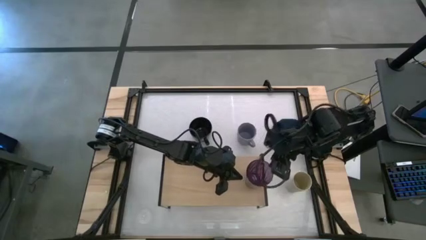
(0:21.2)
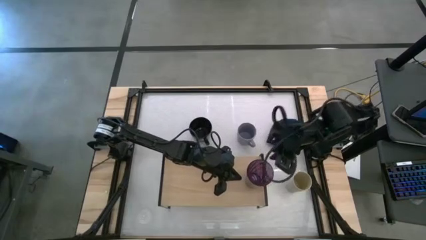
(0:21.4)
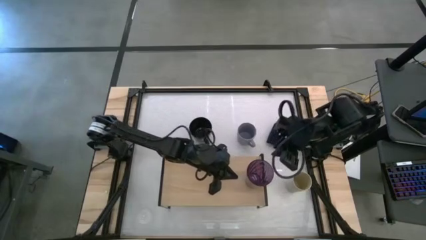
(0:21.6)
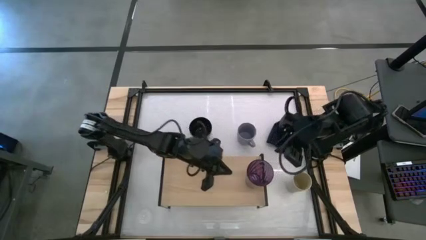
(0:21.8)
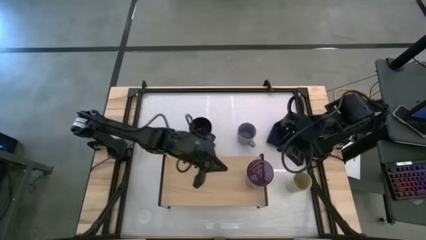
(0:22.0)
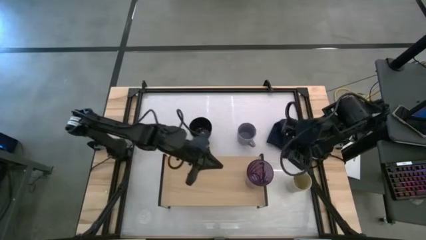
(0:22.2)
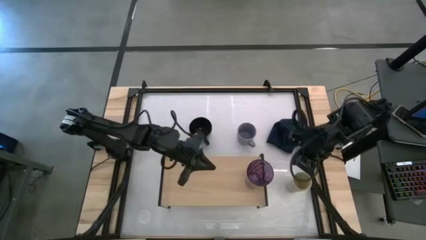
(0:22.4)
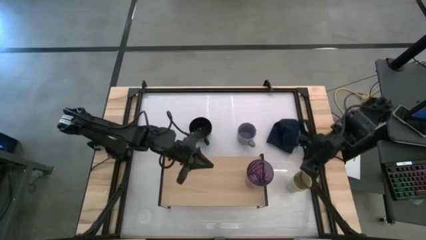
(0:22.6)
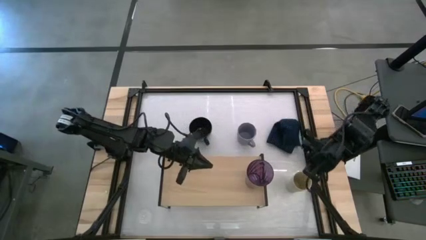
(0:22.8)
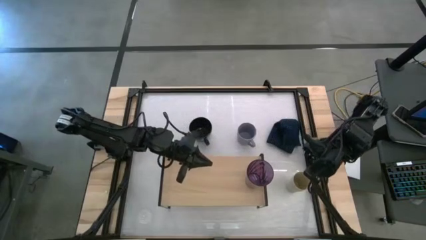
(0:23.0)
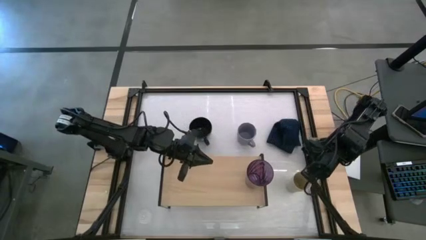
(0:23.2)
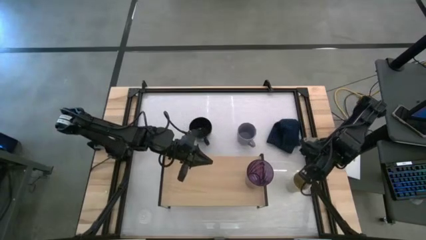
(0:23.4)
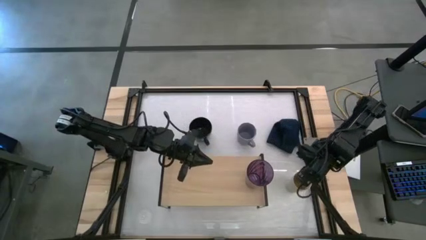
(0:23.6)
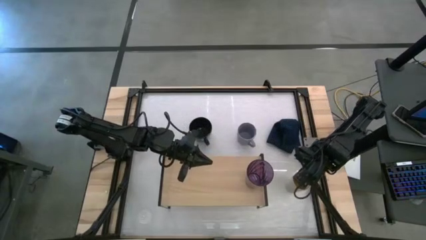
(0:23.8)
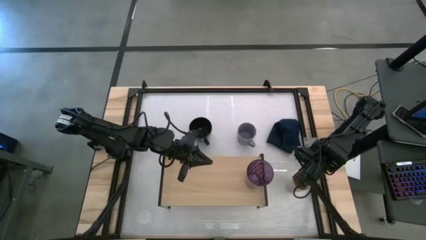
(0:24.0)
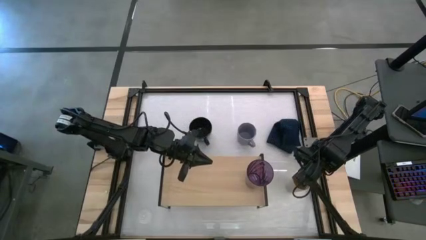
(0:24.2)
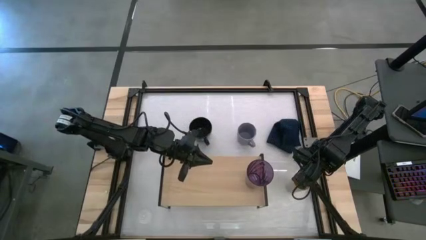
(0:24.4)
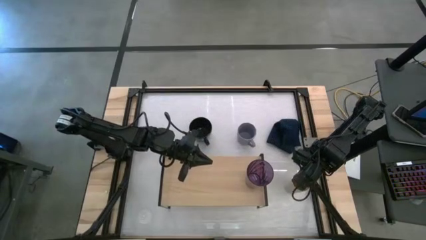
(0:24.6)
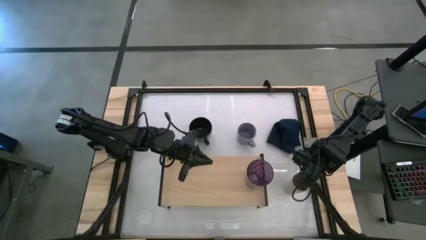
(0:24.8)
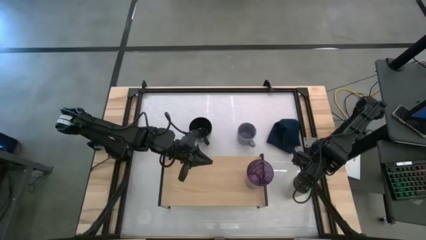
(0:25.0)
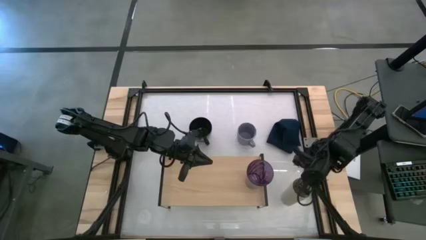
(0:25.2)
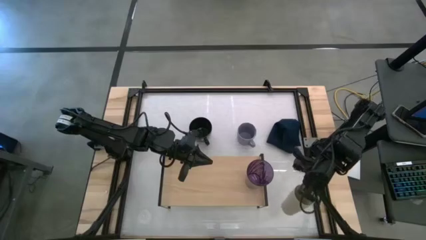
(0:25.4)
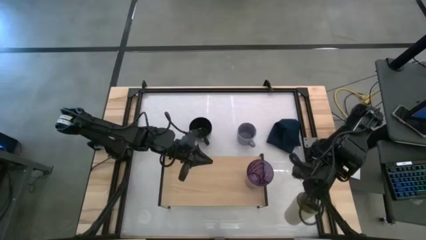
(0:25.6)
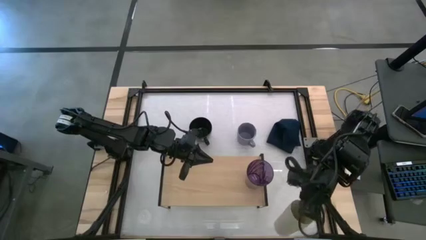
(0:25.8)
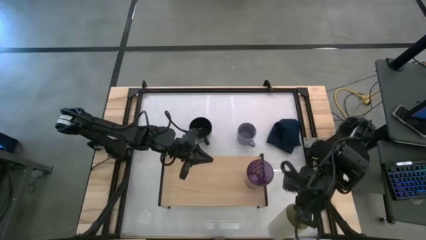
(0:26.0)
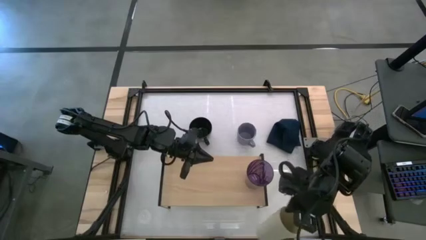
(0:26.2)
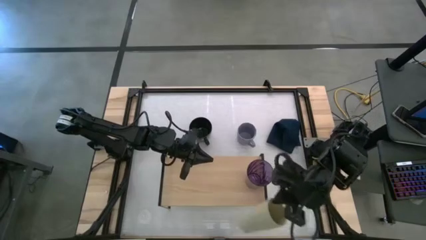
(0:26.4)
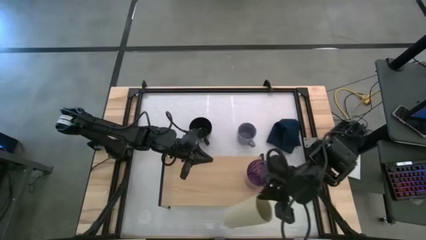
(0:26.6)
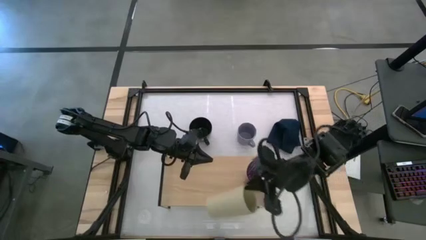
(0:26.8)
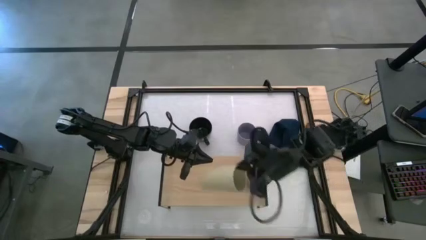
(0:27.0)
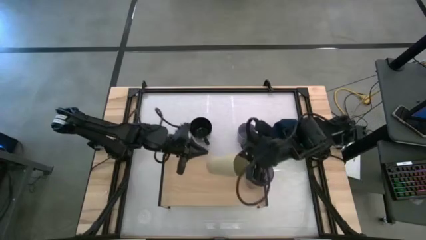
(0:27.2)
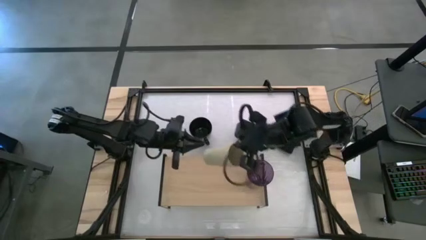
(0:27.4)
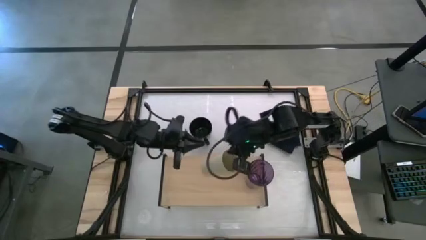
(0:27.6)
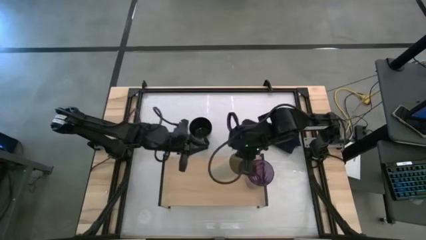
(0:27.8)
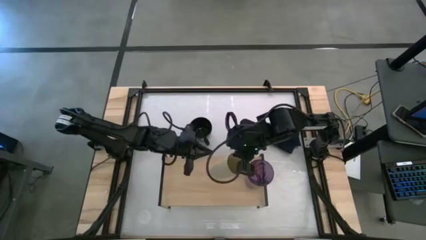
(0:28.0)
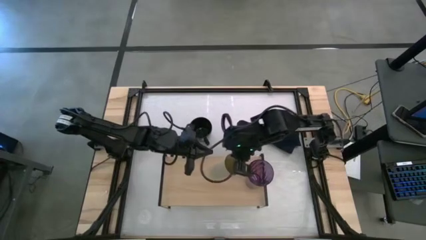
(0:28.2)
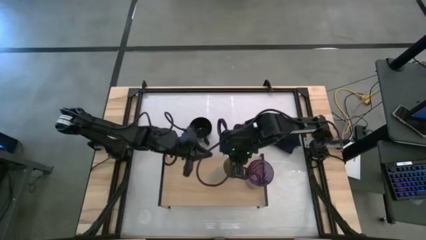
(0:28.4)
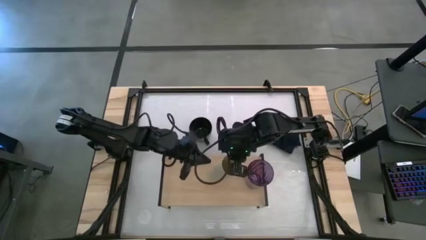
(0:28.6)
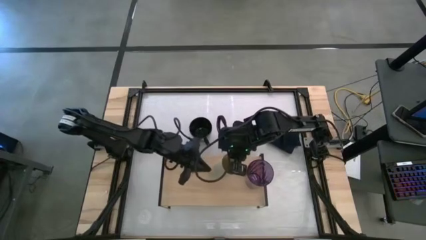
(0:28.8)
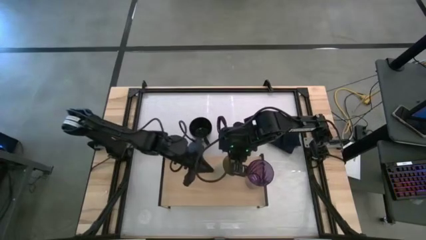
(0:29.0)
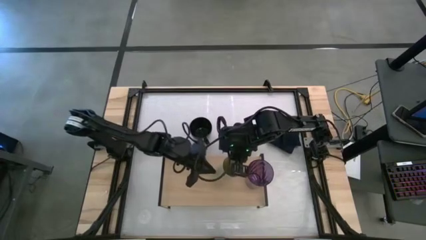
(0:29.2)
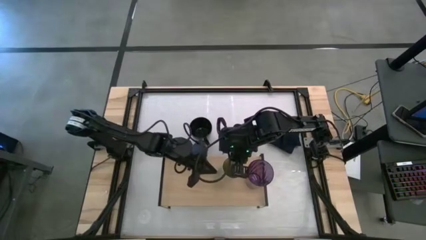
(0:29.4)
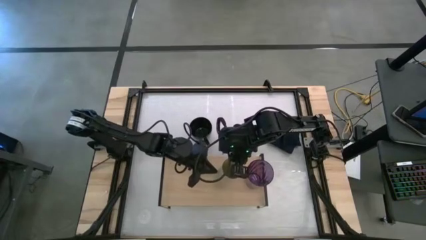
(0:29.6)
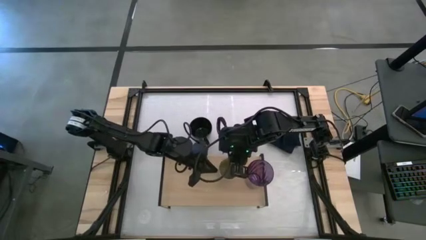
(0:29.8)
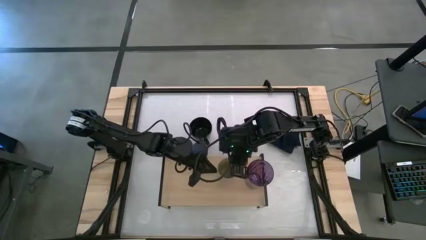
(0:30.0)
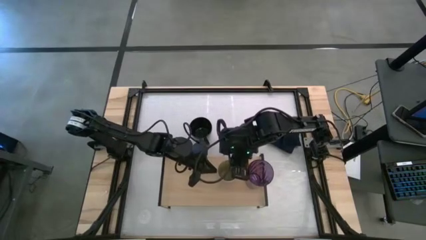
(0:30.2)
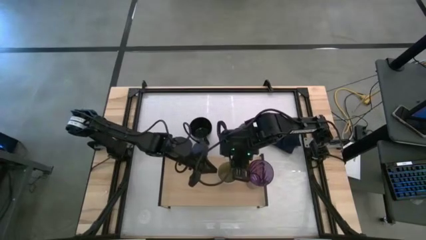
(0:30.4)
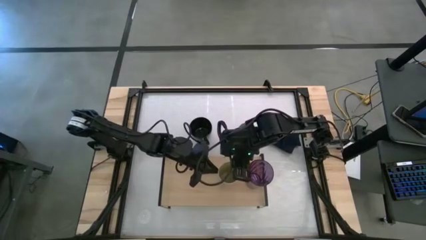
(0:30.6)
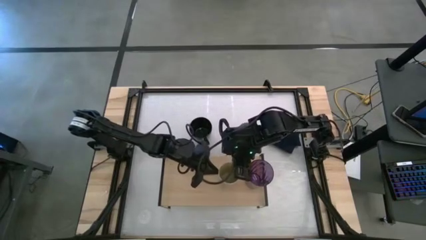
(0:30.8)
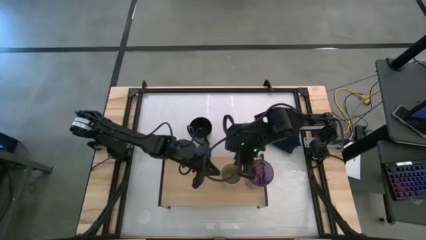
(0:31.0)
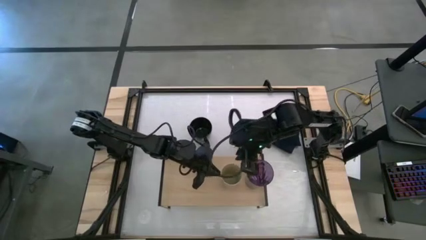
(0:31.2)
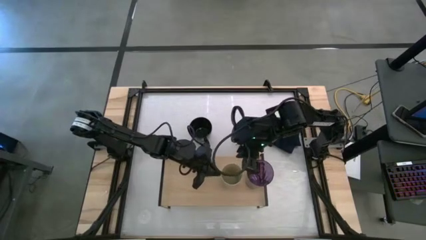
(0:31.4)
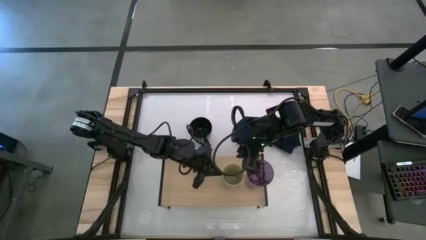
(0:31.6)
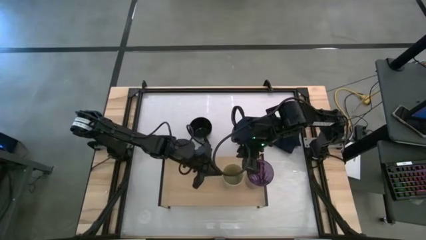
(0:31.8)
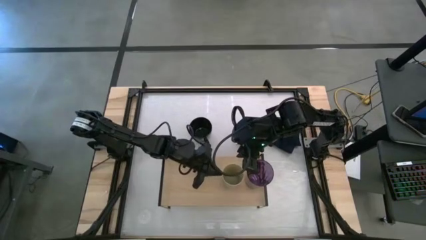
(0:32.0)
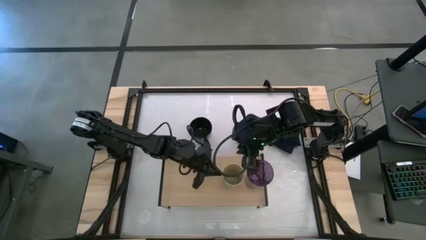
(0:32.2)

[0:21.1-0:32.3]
Task: Stack small to large cups/mugs on shelf
Put the brown mug on the shelf

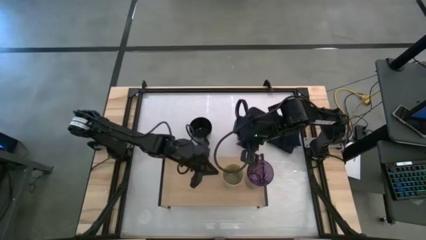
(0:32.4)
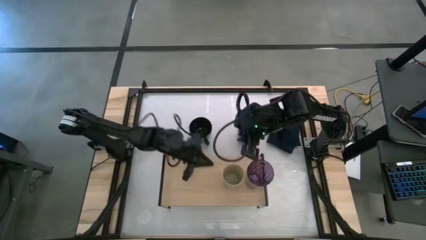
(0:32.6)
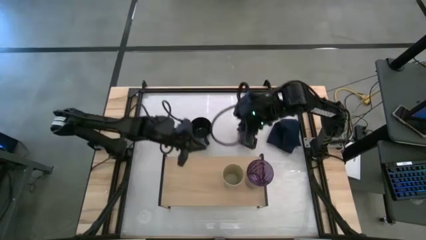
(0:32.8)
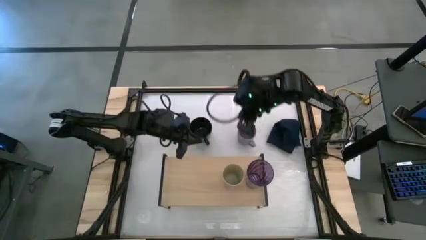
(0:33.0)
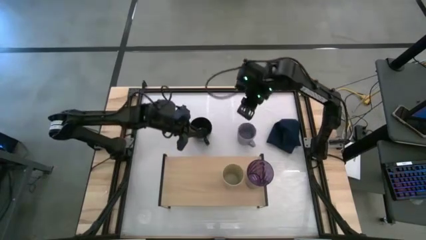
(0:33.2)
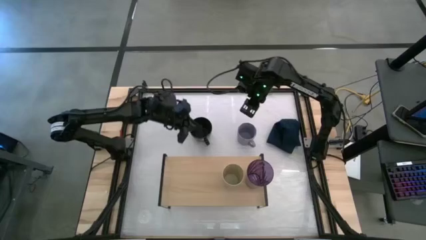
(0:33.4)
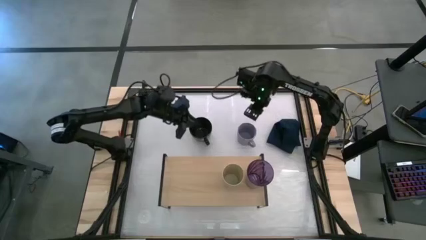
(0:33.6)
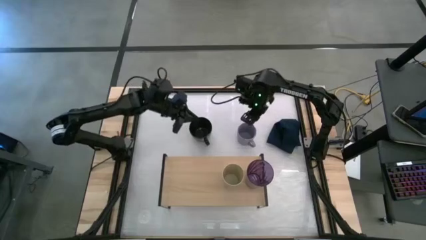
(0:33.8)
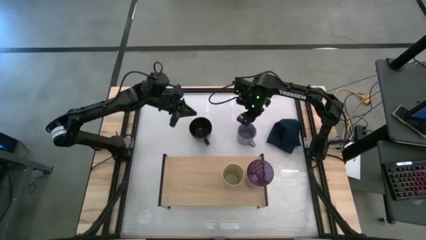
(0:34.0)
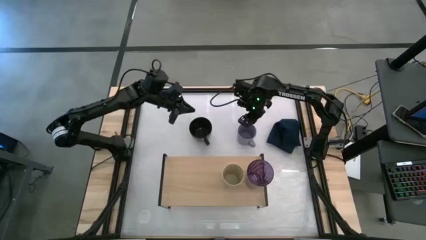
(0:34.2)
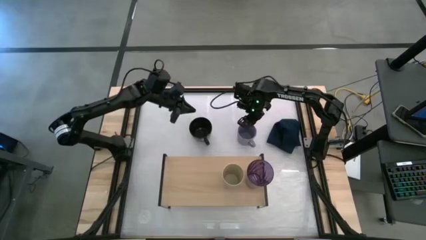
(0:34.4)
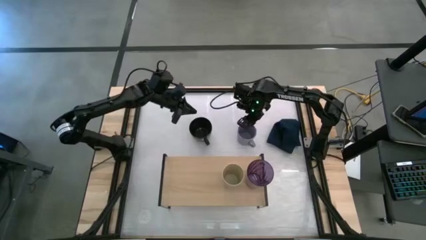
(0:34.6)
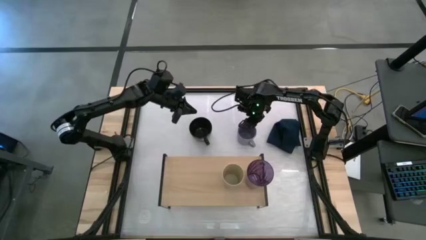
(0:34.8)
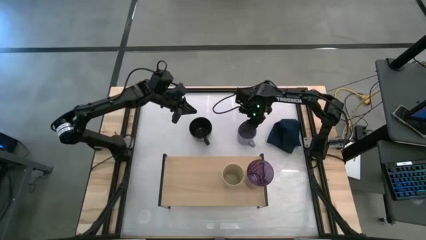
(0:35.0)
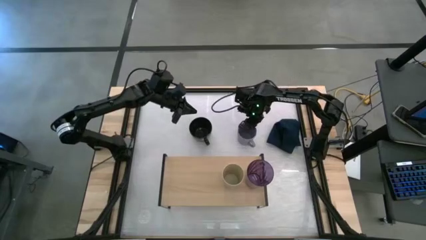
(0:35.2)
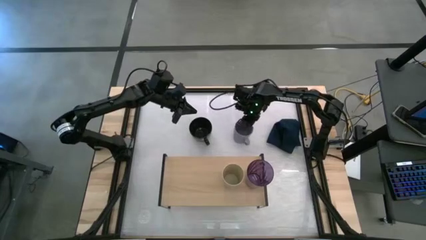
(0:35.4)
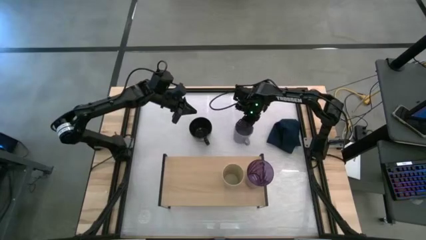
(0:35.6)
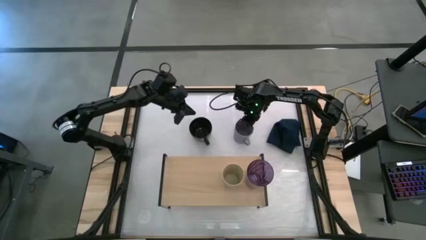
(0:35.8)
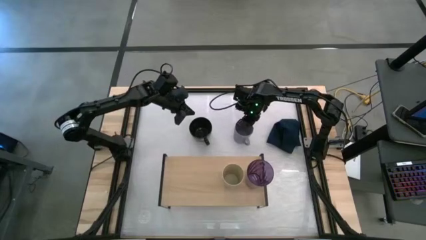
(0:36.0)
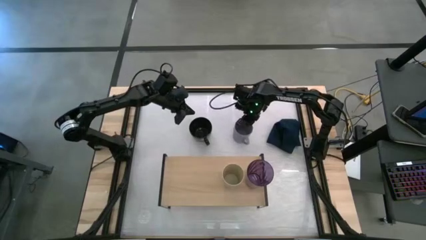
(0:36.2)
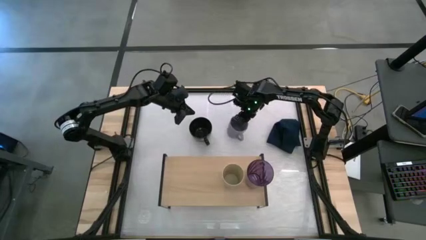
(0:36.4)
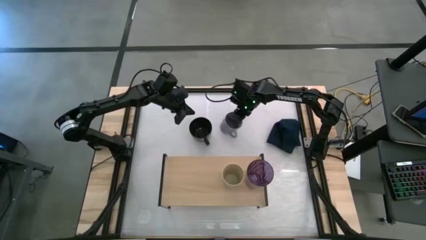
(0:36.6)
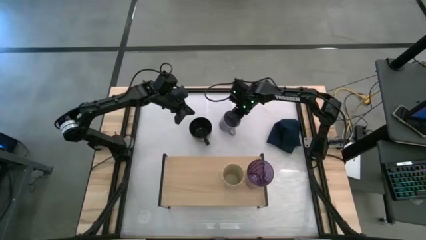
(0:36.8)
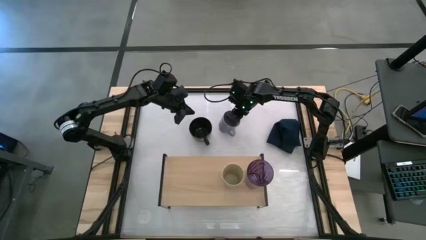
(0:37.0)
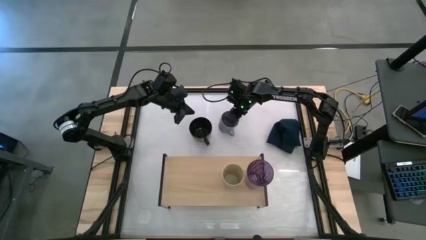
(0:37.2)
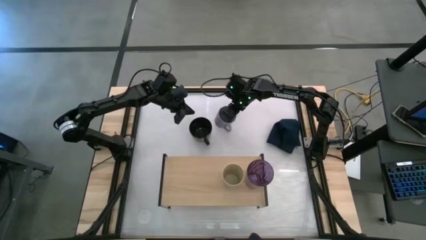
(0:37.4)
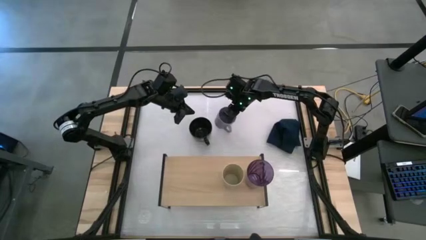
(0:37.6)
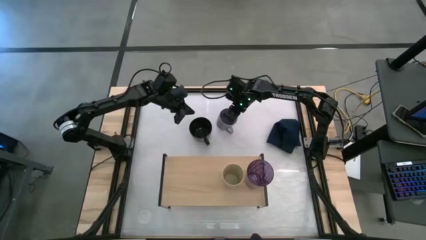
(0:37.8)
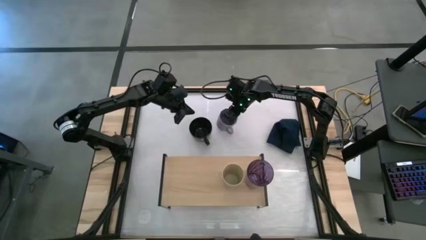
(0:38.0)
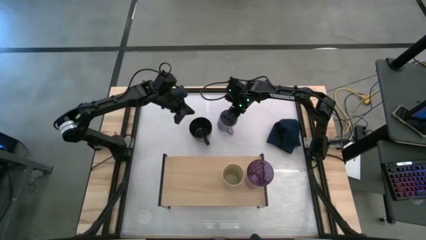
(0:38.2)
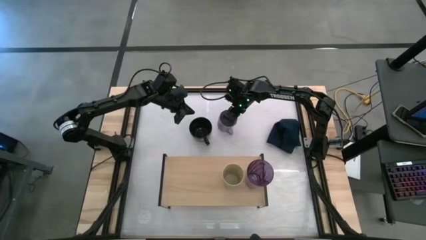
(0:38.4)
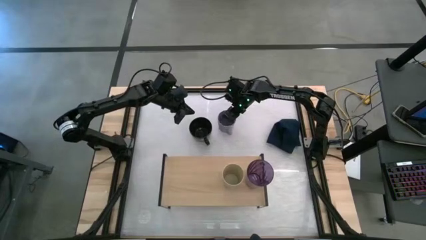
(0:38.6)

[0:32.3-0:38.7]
Move the gray mug to the middle top of the table
